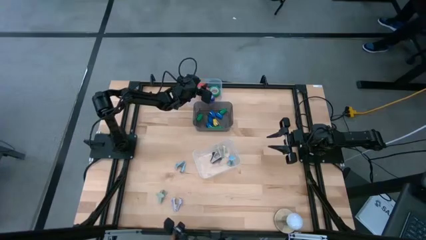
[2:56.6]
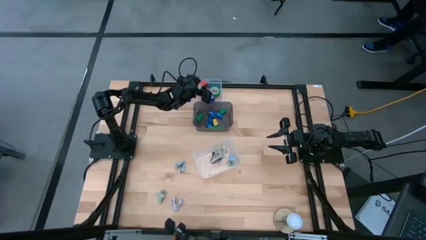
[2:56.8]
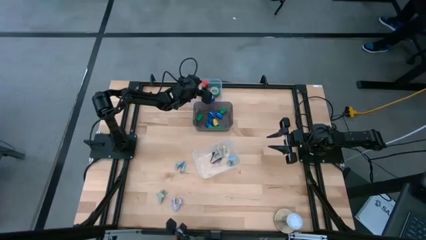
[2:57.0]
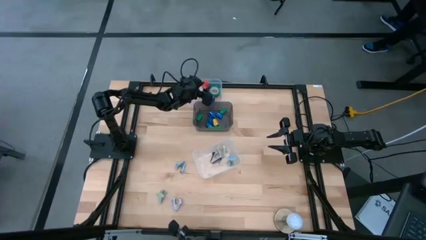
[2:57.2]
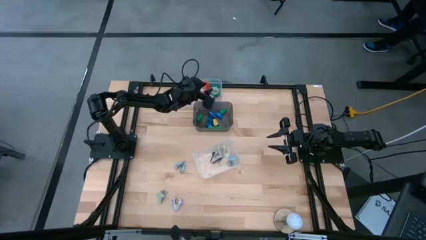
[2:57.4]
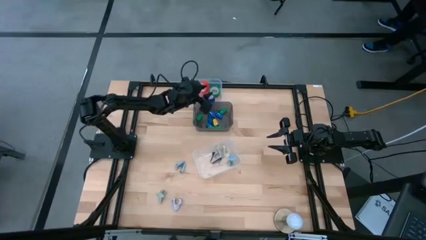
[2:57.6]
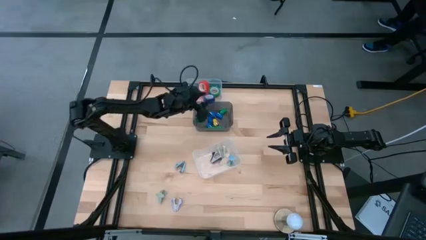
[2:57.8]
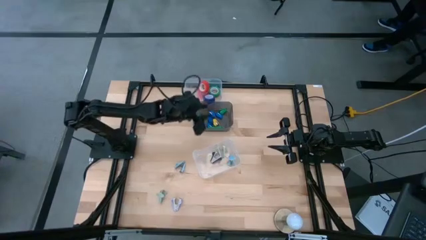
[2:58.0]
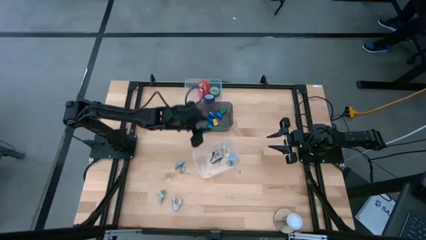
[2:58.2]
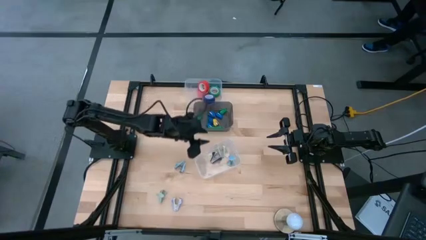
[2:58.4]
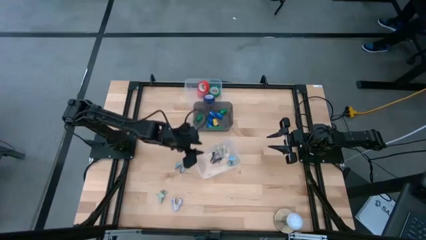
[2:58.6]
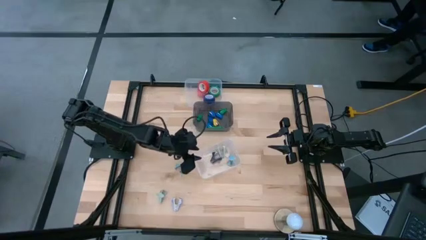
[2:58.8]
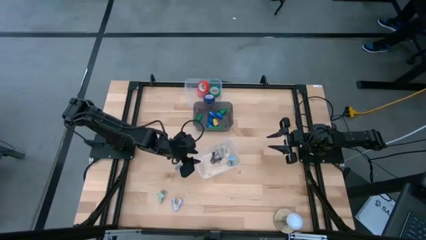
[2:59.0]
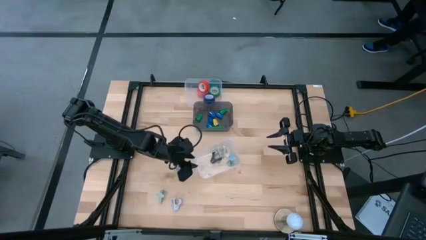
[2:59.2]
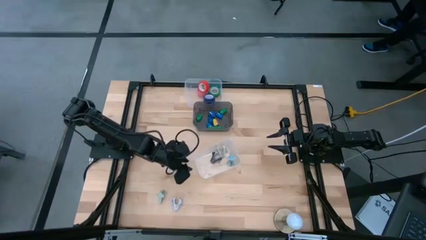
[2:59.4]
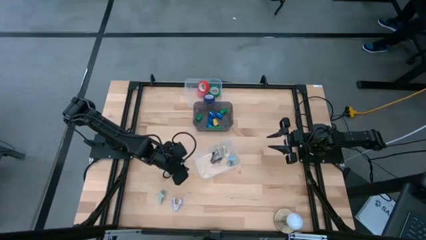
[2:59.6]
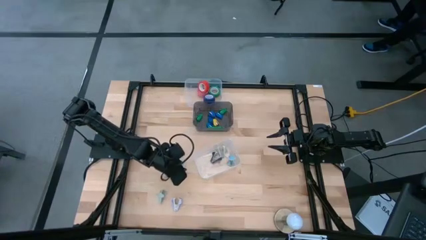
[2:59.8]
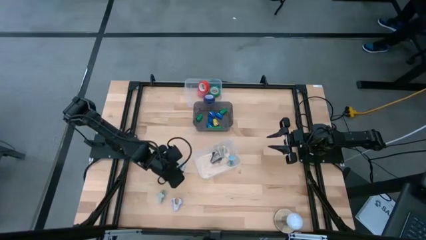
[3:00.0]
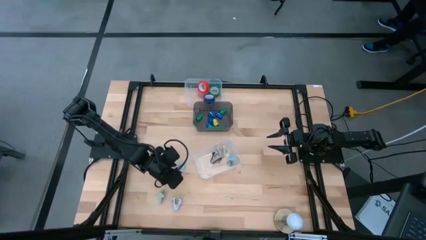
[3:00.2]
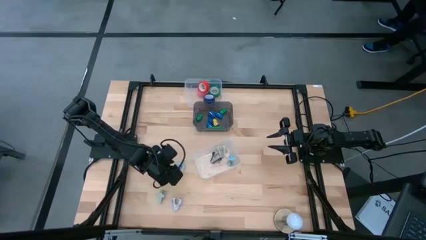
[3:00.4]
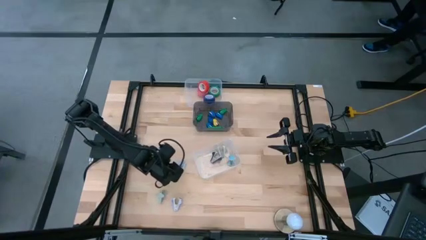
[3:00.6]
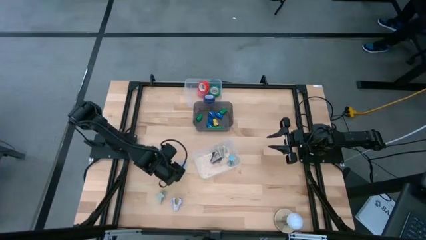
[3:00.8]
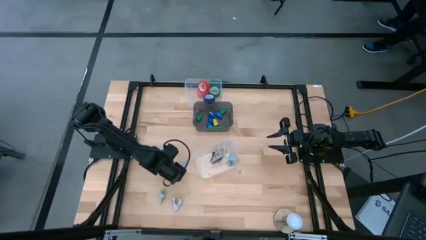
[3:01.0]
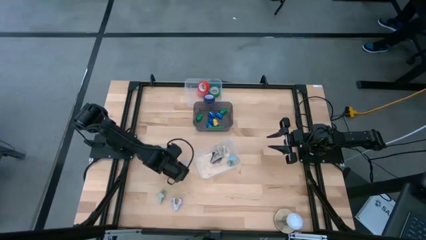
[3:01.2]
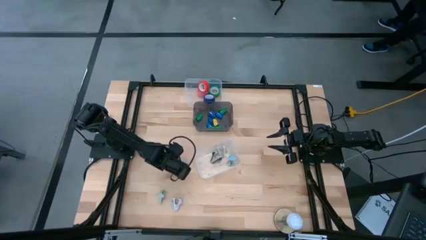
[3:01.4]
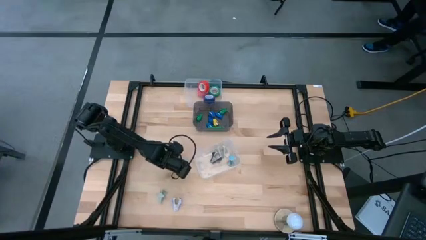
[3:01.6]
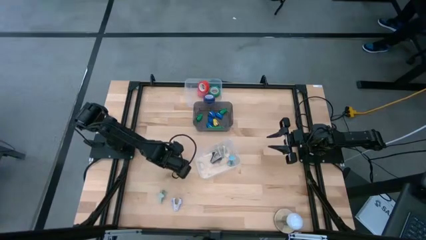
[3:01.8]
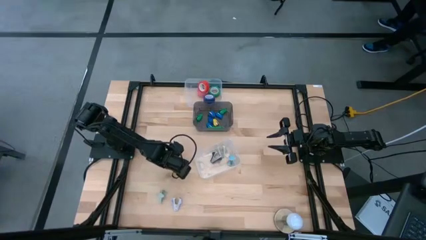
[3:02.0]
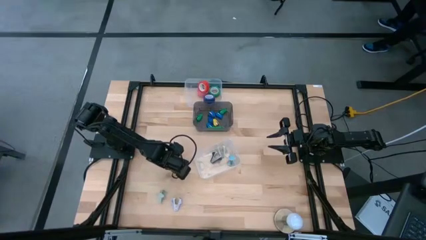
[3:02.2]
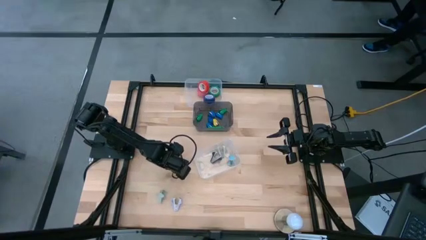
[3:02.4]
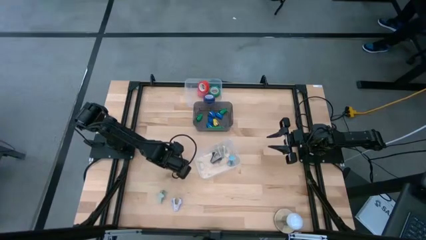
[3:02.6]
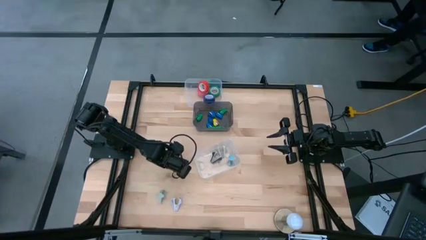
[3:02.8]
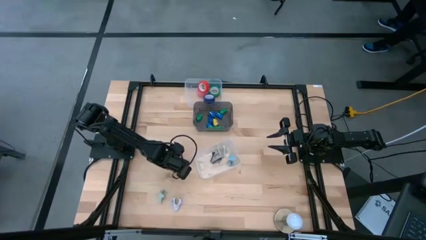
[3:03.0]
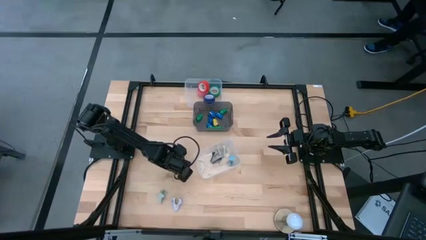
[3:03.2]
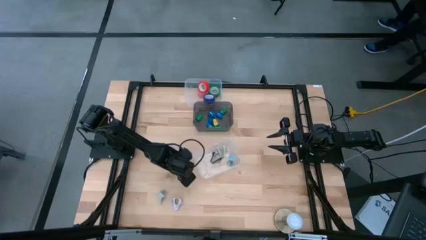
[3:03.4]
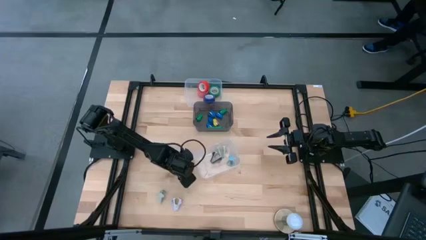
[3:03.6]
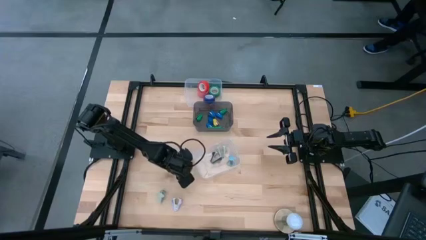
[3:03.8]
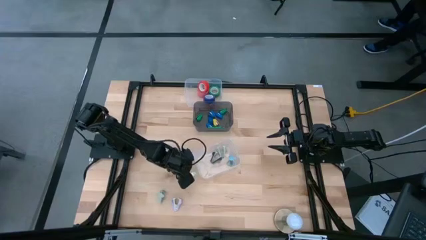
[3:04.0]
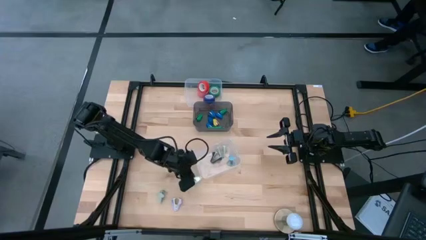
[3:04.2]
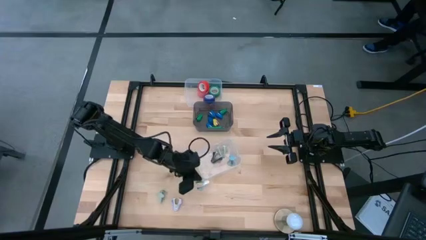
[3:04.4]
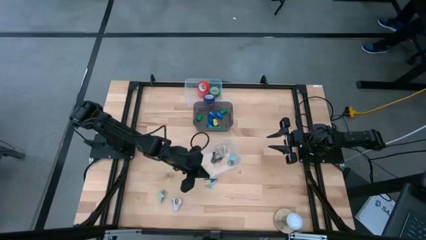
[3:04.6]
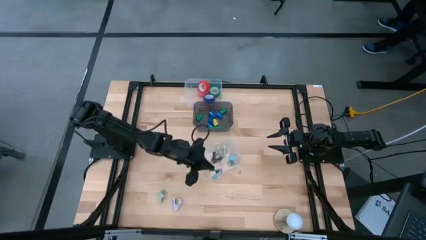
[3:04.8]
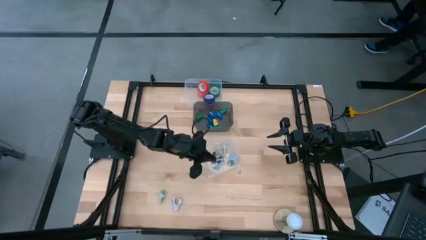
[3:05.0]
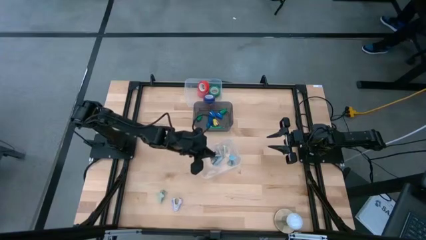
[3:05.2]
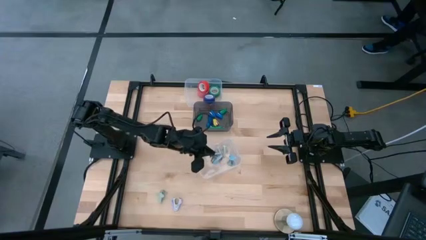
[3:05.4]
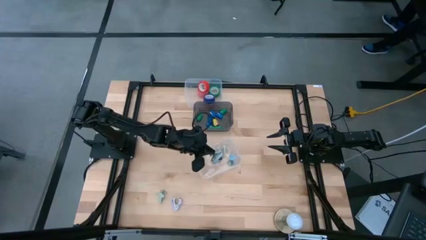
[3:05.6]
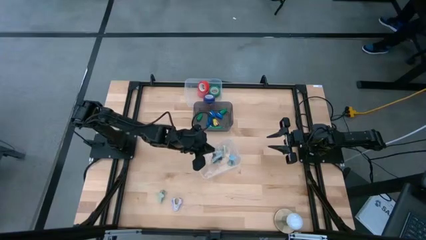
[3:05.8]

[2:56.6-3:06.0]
Task: Pick and place Stapler, Stapler remover, tape
Put the blue staple remover into the bottom transparent bin

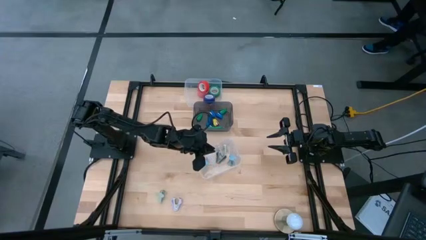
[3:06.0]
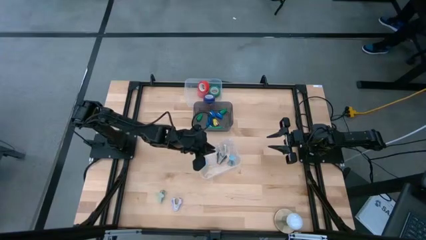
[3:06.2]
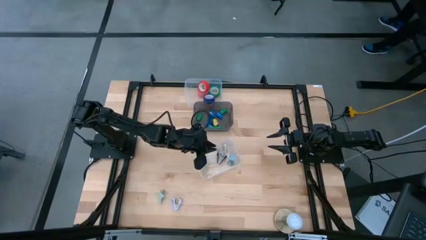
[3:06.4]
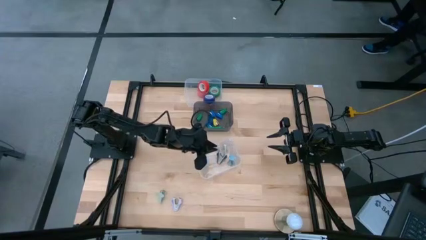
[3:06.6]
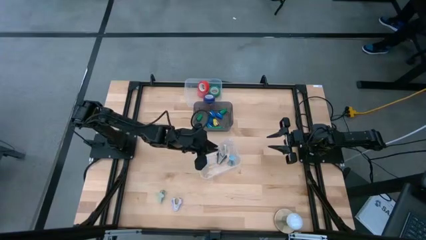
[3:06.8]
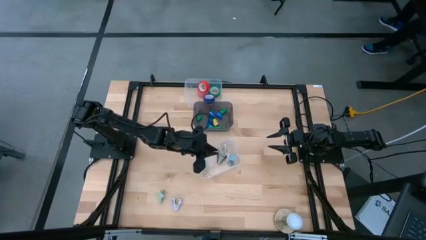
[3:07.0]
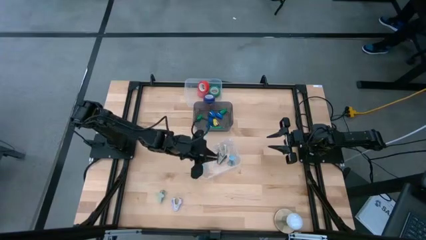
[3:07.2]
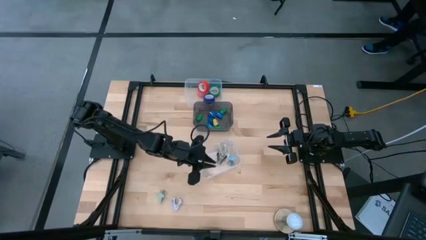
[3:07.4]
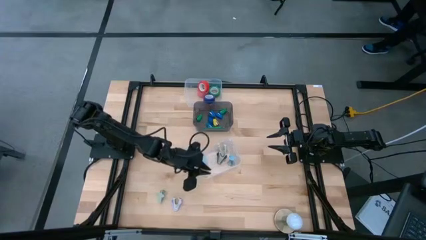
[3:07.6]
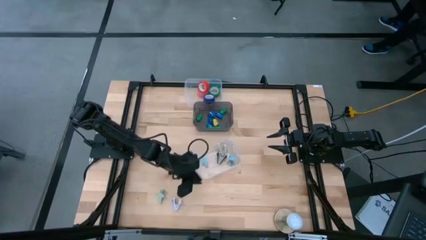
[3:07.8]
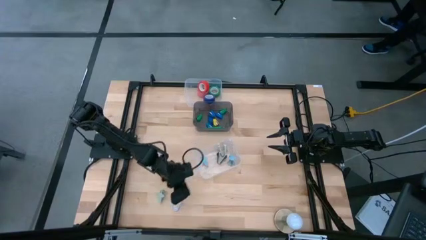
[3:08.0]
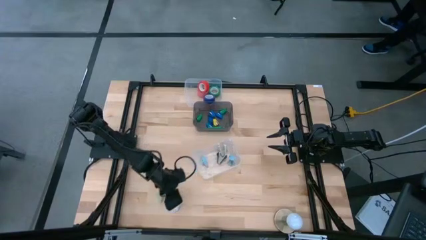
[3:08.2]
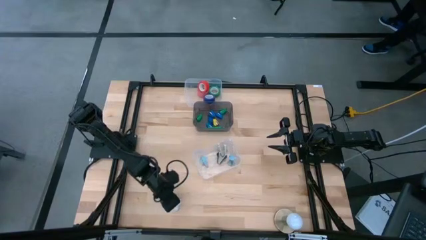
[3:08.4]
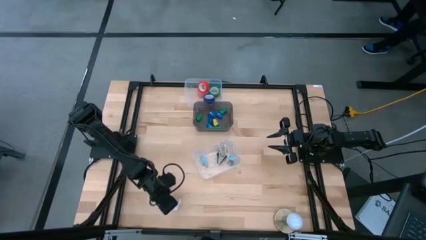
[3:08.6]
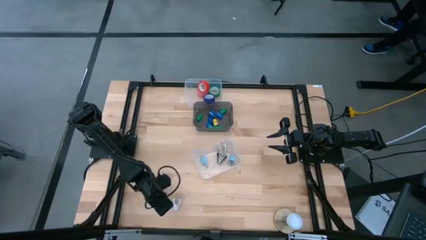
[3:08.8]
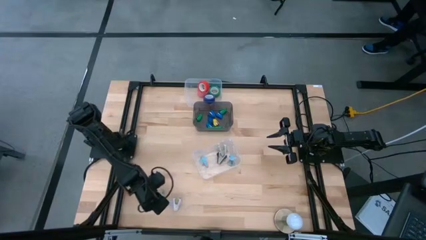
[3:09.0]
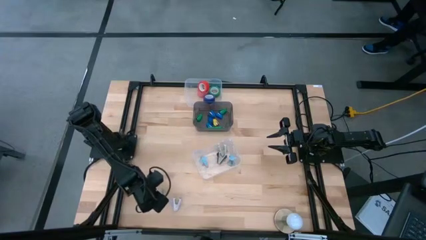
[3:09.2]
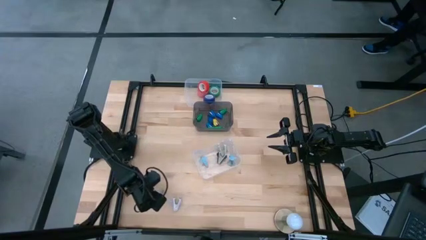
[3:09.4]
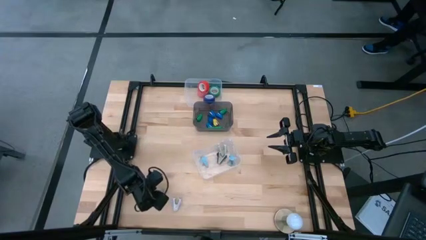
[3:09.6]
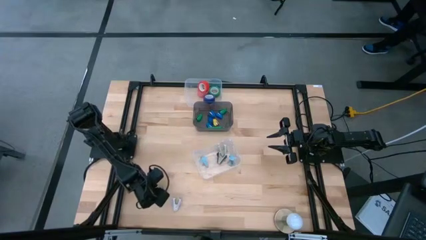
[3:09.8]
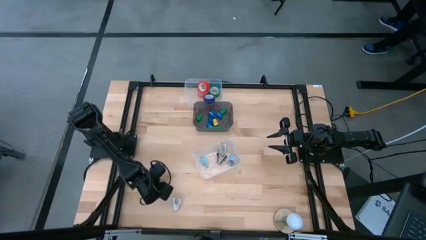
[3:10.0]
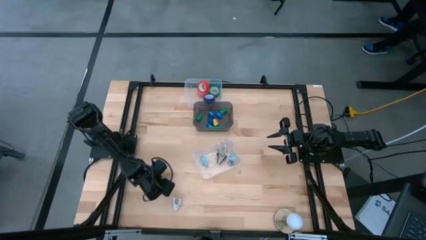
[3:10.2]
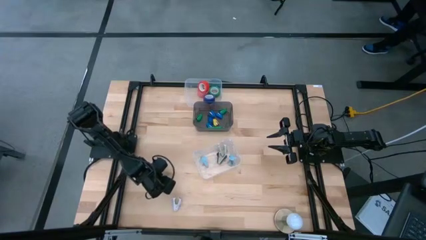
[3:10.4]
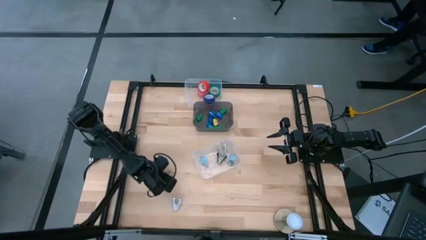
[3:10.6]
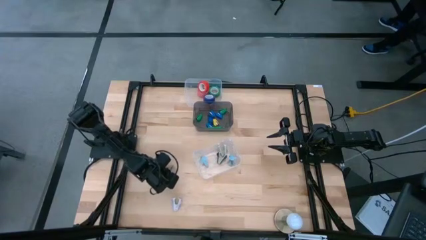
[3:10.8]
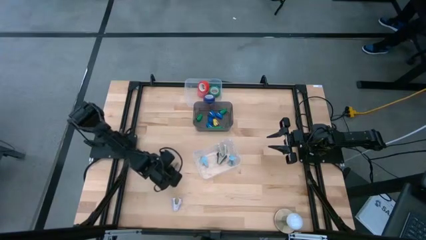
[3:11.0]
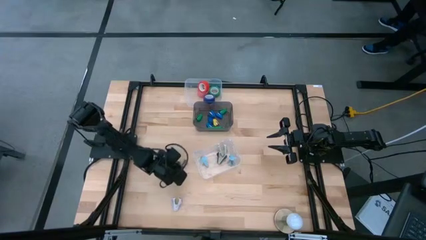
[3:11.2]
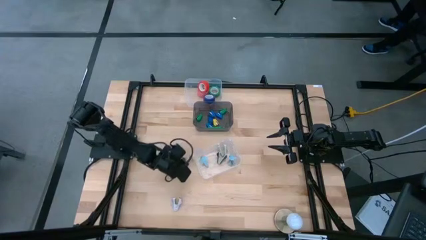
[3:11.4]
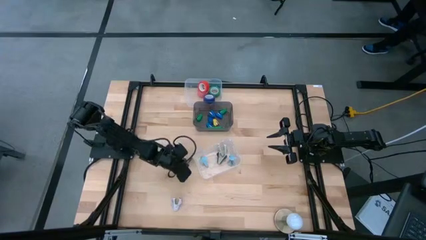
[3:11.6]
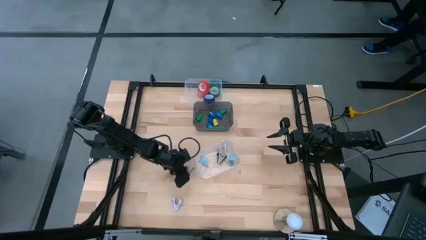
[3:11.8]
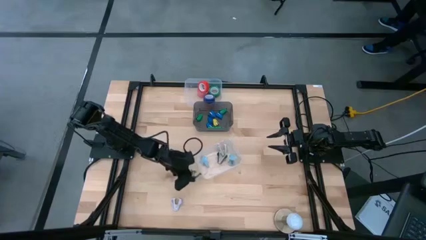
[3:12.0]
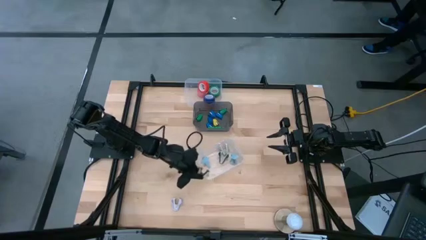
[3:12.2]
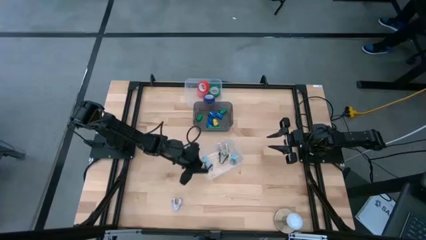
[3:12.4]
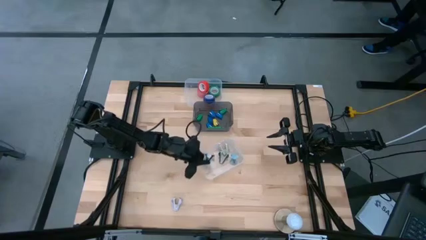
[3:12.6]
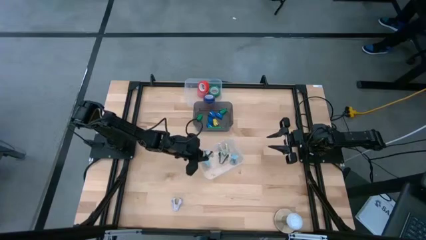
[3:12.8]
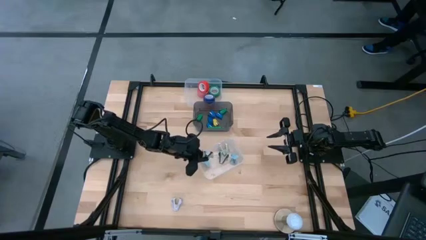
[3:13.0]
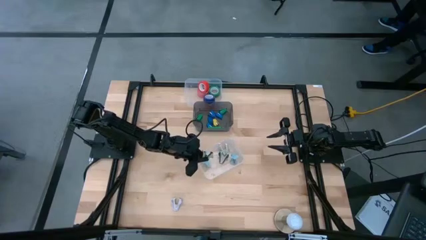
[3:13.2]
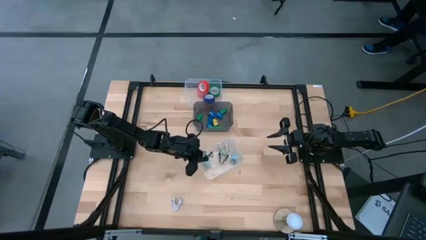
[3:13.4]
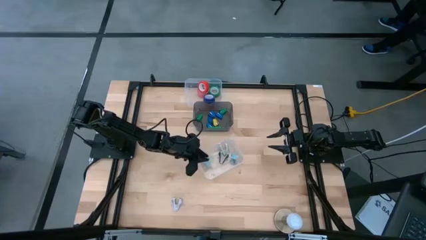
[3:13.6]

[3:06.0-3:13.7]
Put the gray staple remover into the bottom transparent bin
